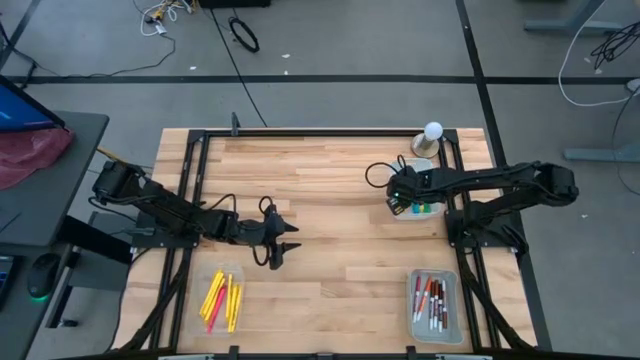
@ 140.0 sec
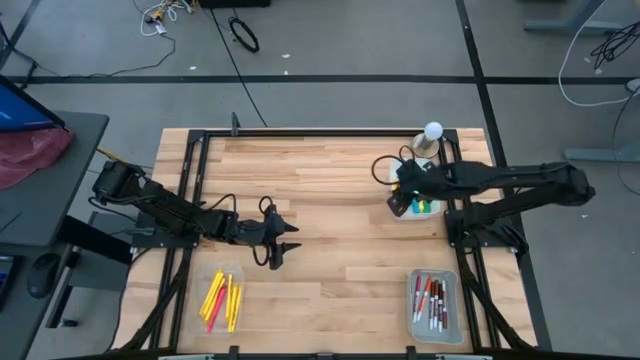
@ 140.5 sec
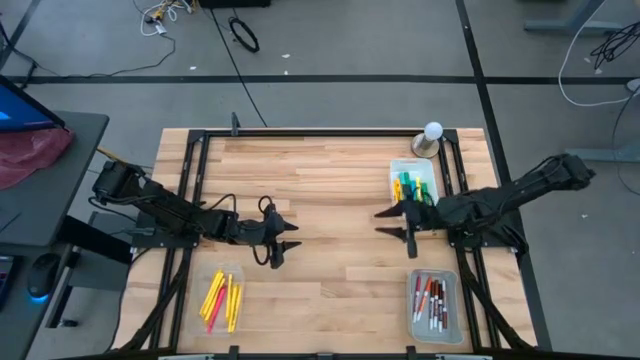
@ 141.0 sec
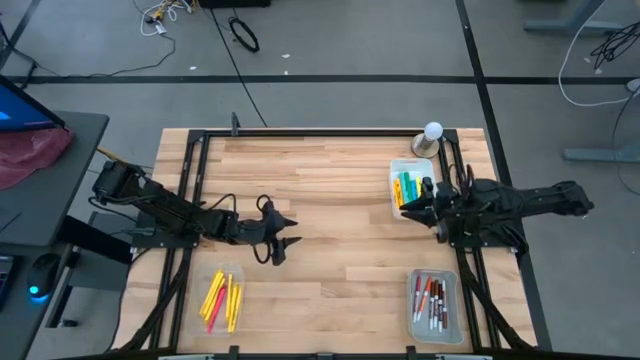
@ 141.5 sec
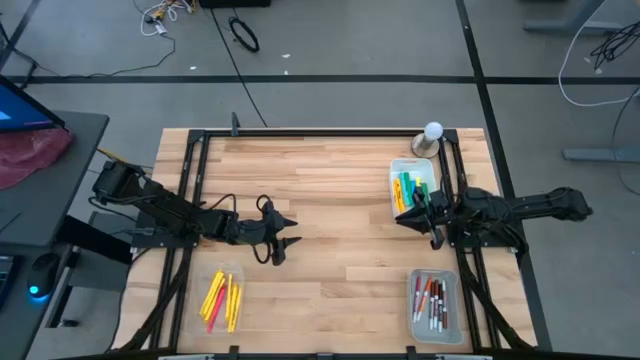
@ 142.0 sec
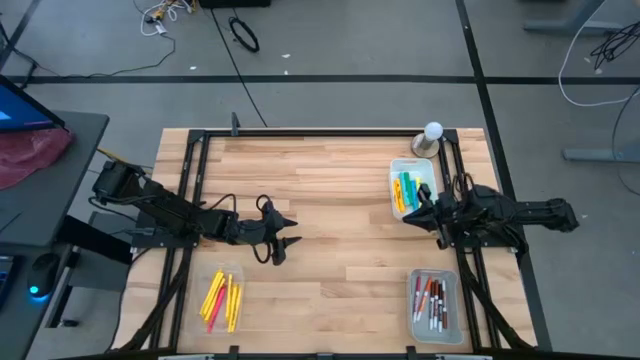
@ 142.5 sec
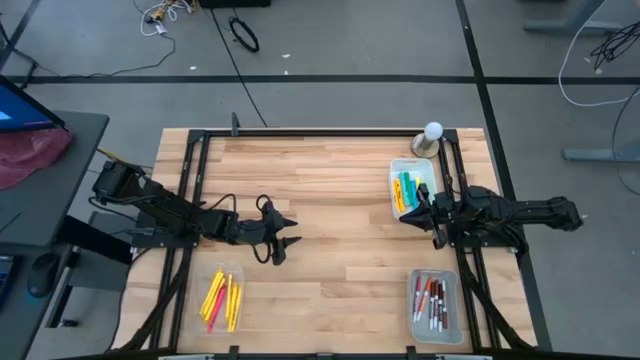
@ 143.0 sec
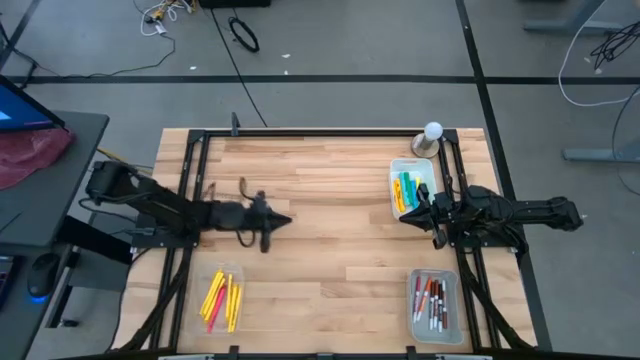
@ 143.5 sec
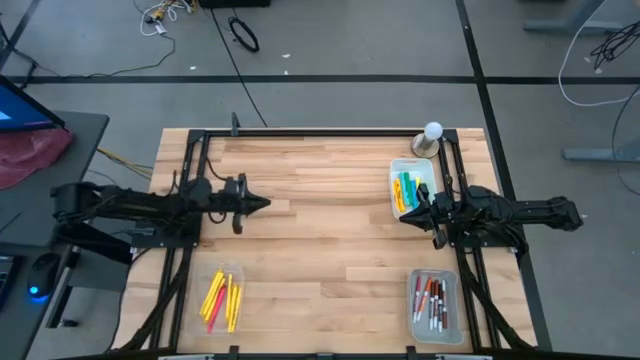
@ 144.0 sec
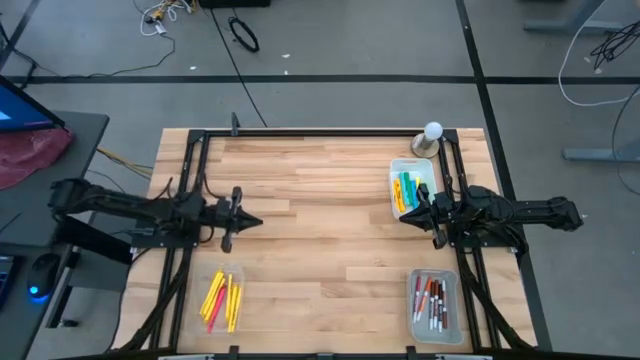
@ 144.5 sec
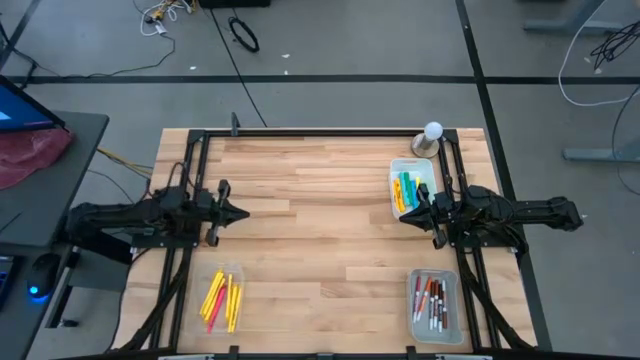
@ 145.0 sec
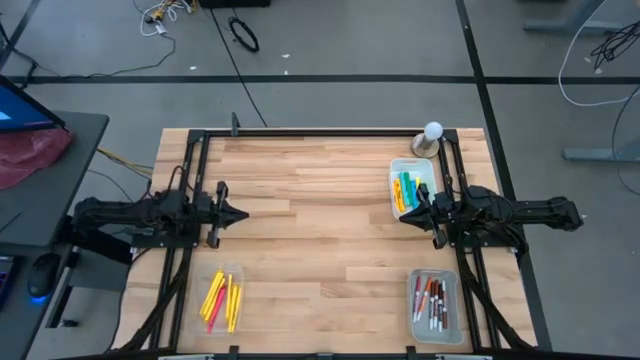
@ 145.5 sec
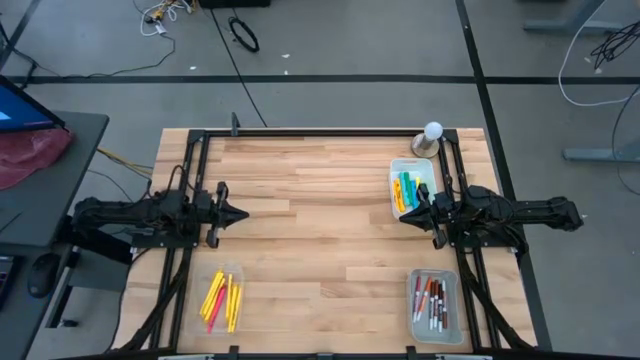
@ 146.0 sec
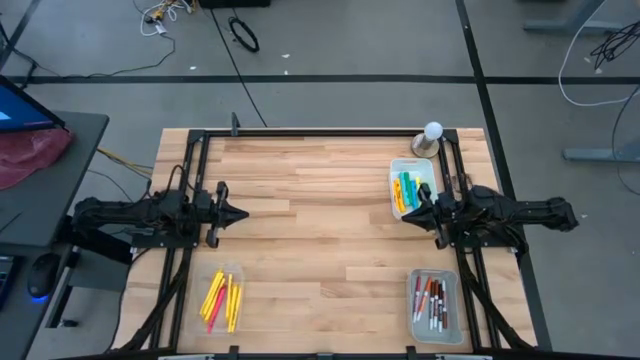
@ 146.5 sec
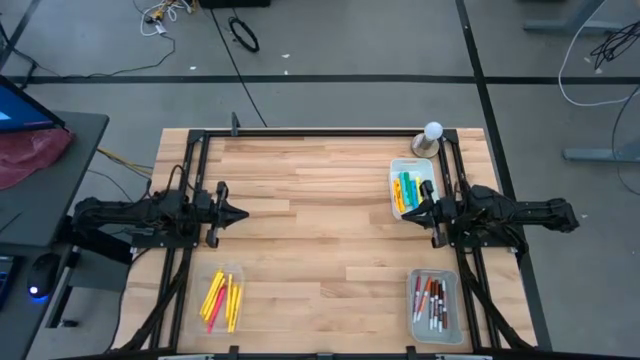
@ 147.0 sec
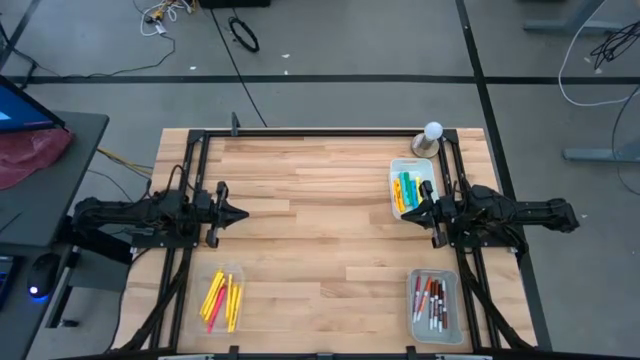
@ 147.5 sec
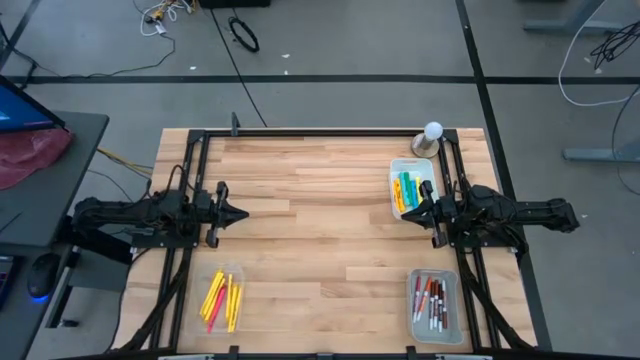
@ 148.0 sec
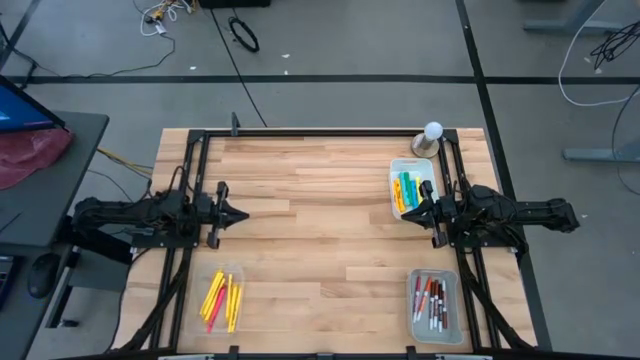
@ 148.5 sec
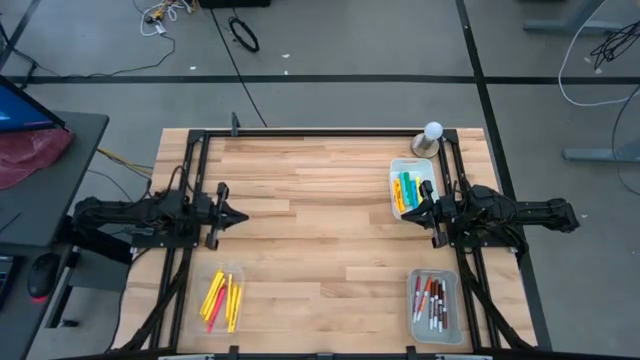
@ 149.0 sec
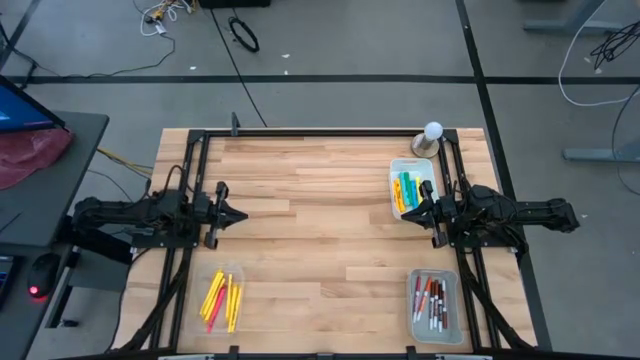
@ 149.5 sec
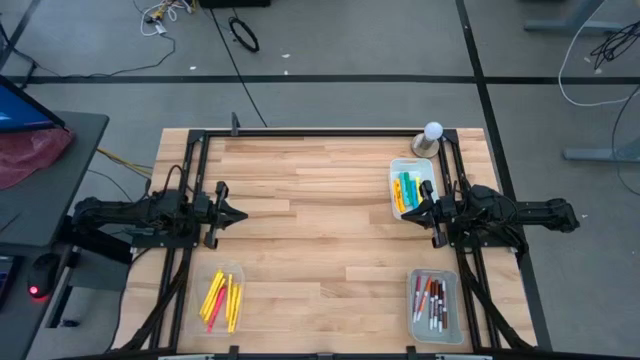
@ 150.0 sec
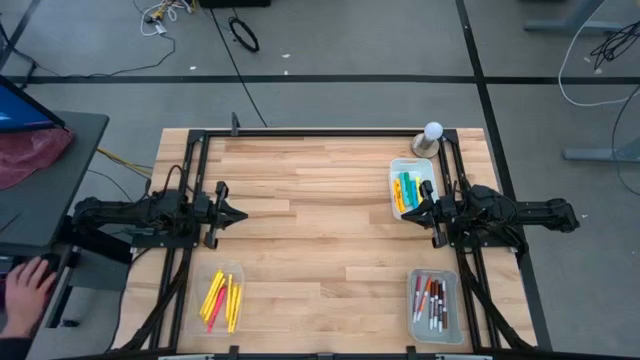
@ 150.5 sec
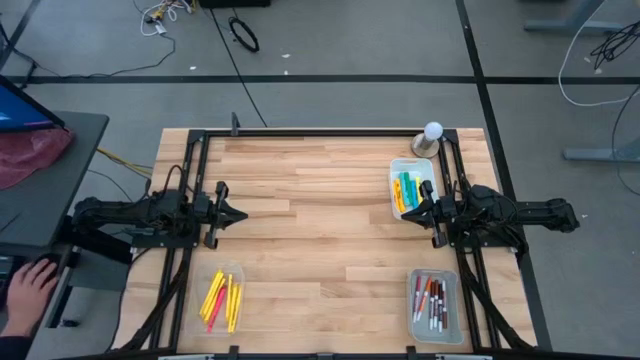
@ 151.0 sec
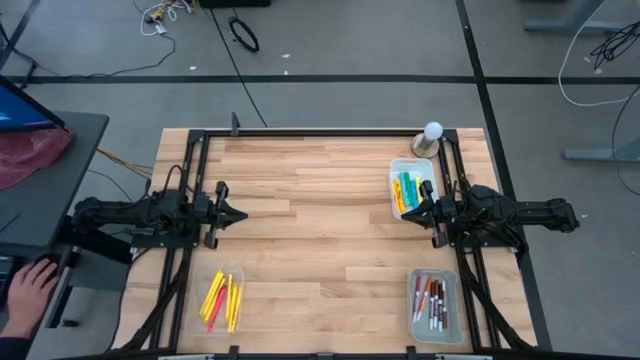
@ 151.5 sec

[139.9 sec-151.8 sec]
Task: Pick & Place Markers
Return to Home Position

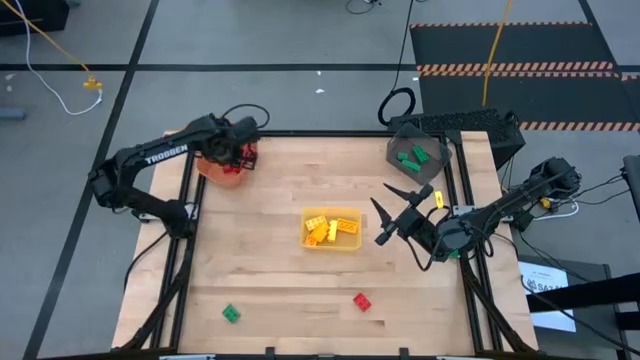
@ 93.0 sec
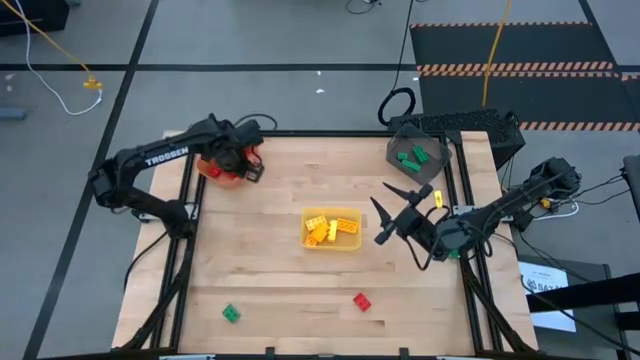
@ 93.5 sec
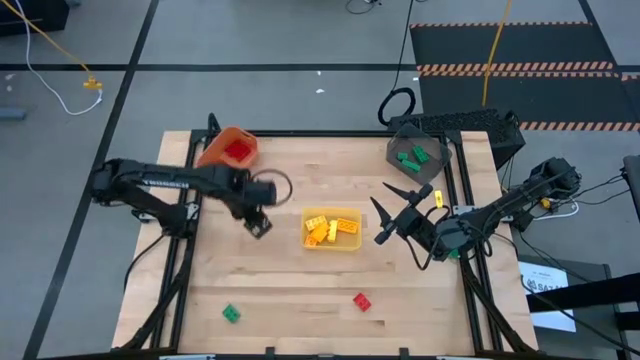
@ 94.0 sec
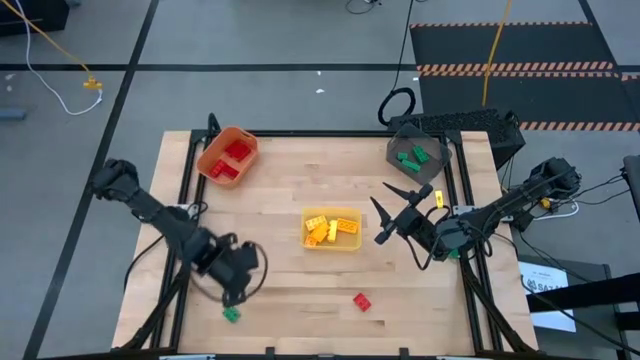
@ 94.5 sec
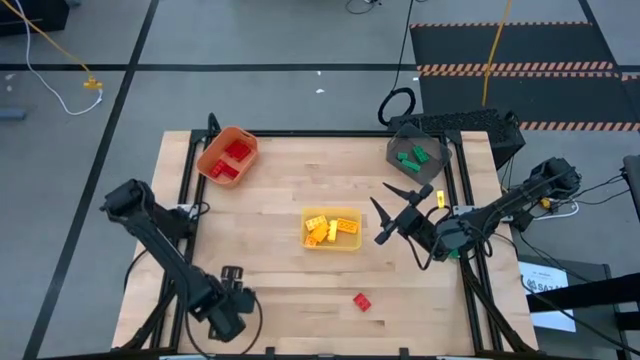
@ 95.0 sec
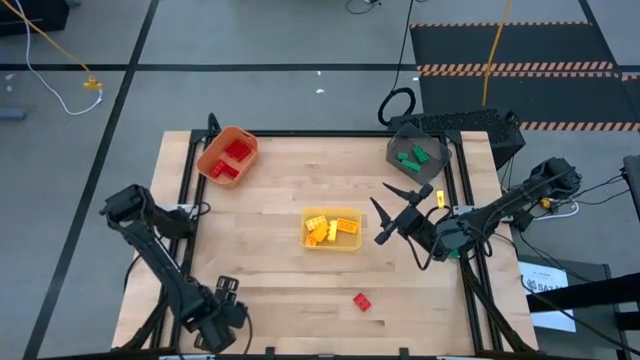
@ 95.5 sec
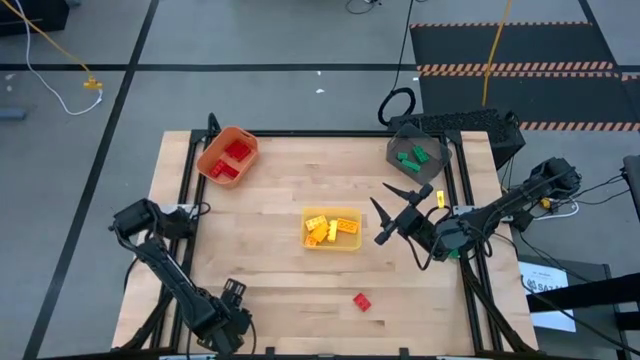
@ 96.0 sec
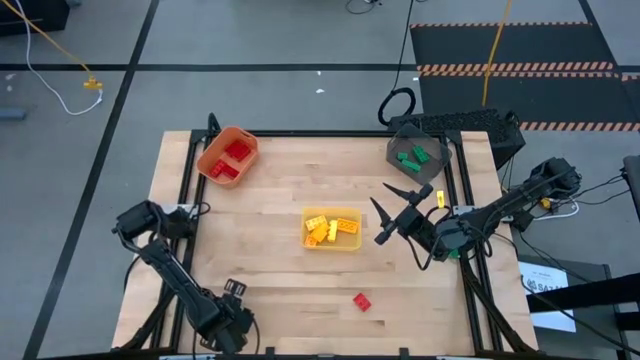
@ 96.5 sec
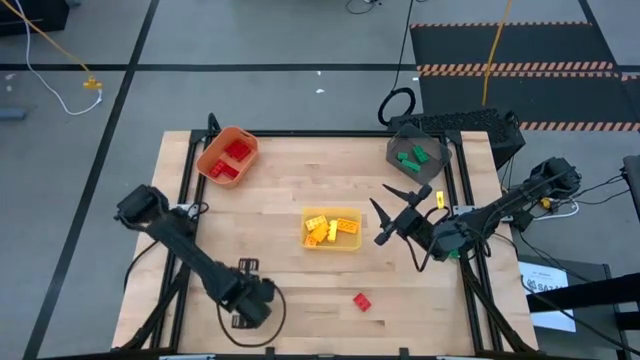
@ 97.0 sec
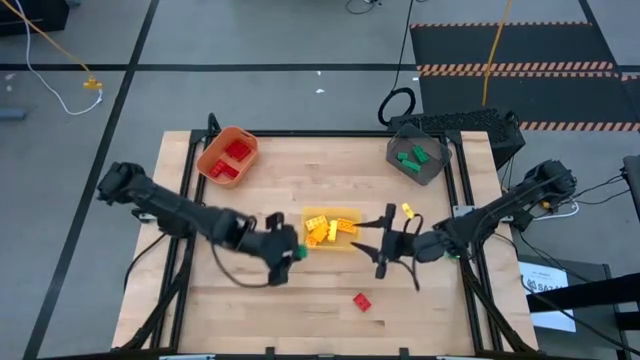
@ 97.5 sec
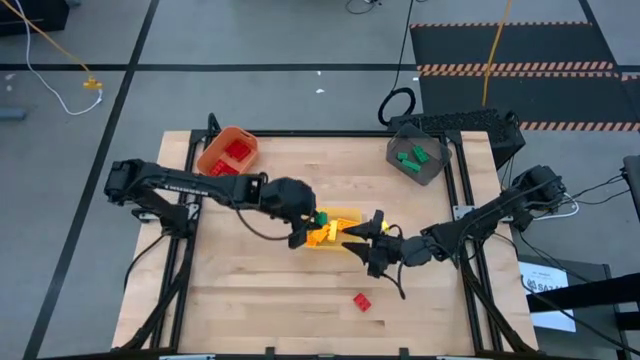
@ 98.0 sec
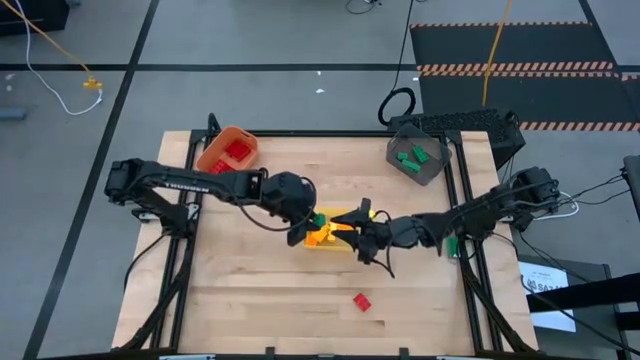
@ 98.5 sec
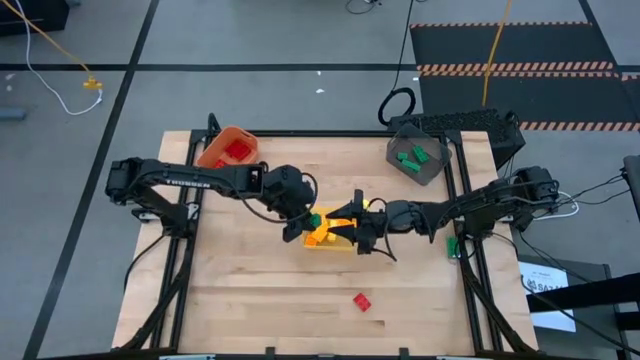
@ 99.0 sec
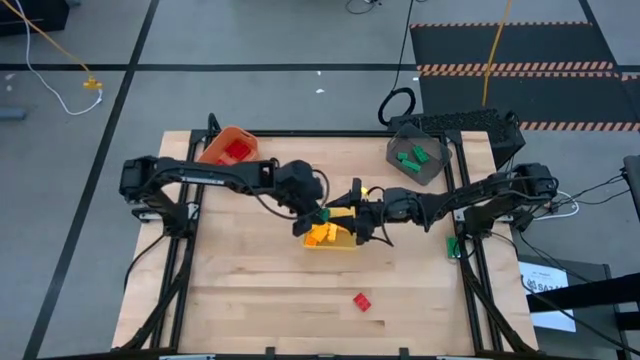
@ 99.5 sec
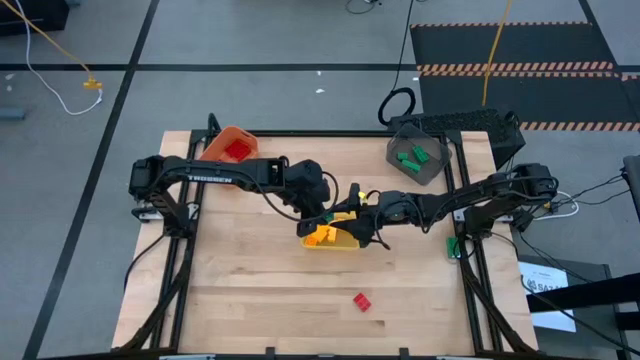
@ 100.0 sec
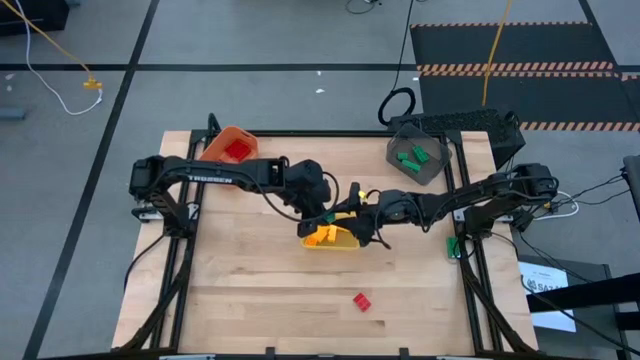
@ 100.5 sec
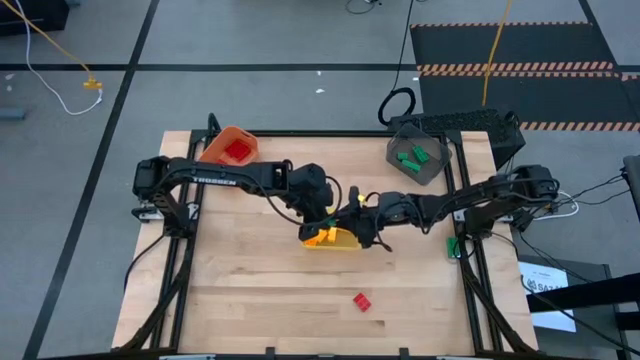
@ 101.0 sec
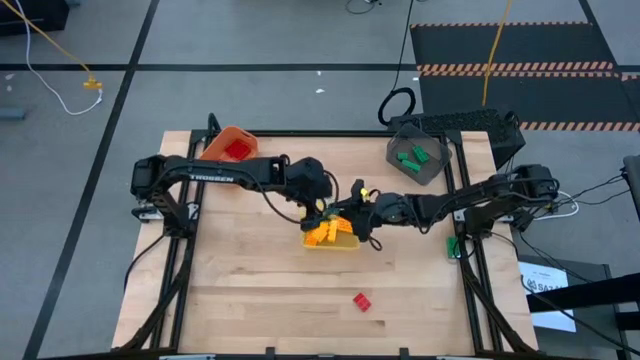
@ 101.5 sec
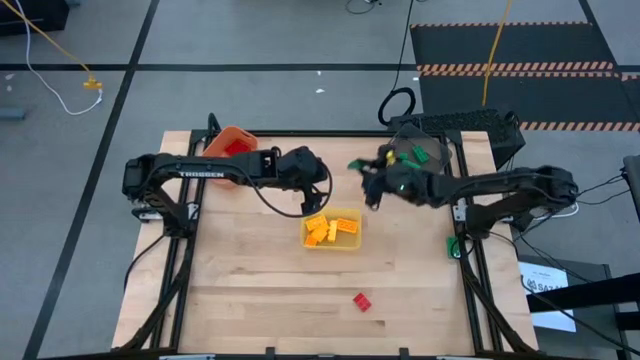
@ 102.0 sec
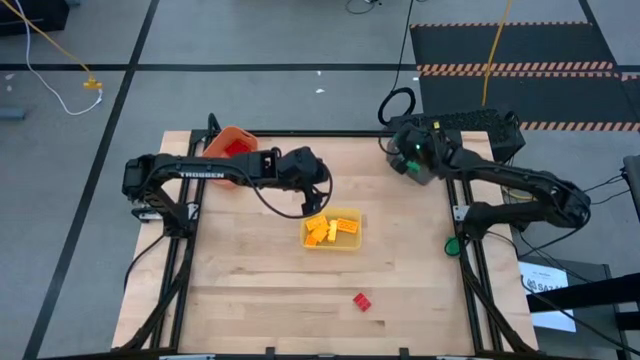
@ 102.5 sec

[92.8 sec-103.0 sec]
Task: Sort & place blocks by color
Put the left green 4-stud game piece into the black bin
